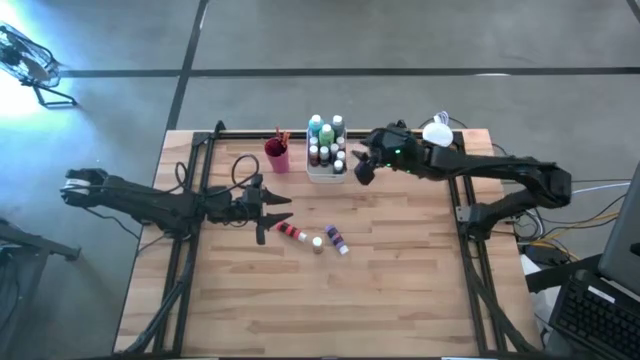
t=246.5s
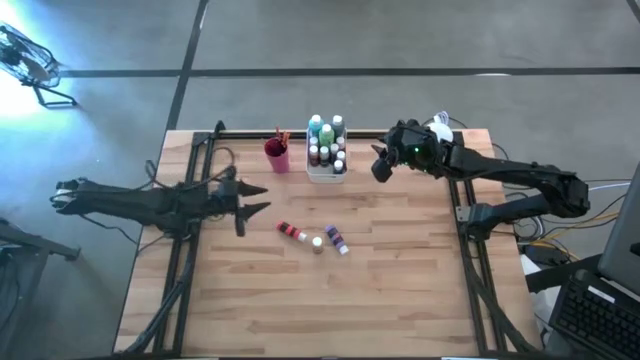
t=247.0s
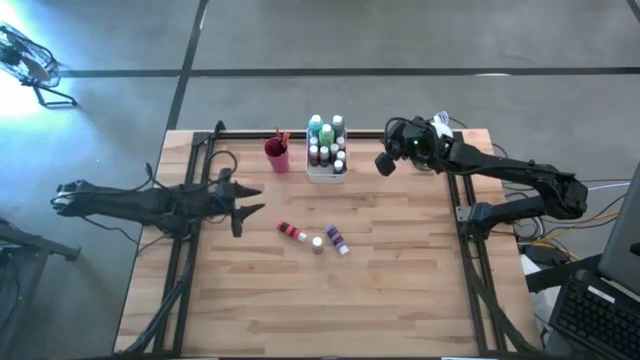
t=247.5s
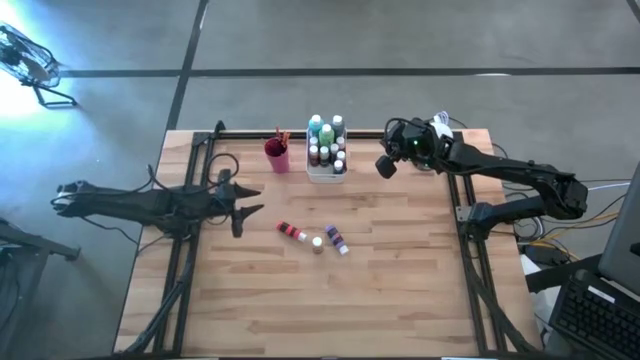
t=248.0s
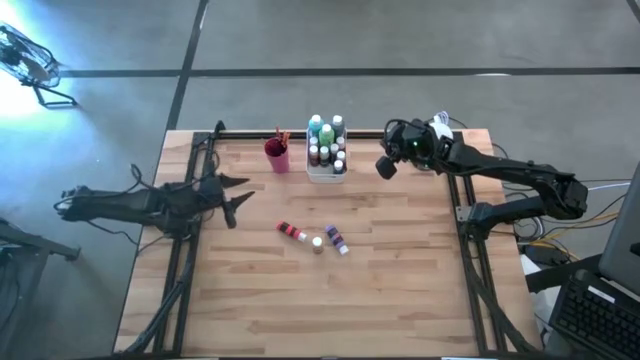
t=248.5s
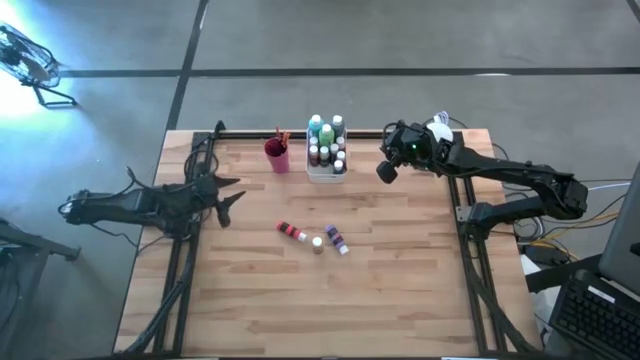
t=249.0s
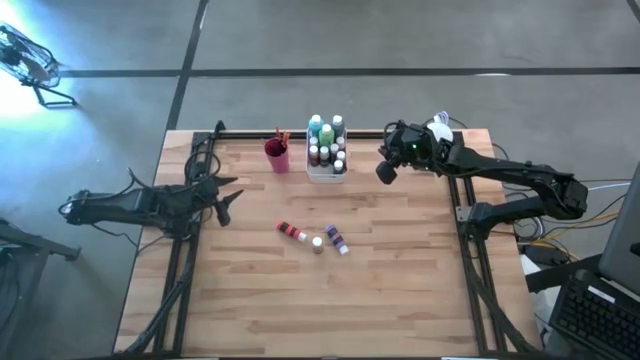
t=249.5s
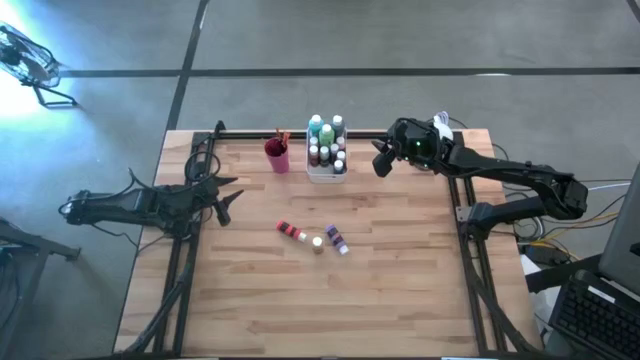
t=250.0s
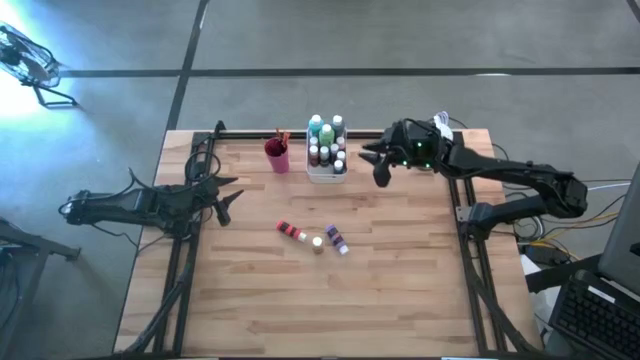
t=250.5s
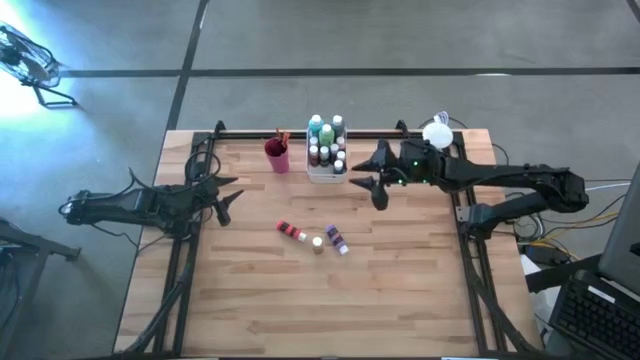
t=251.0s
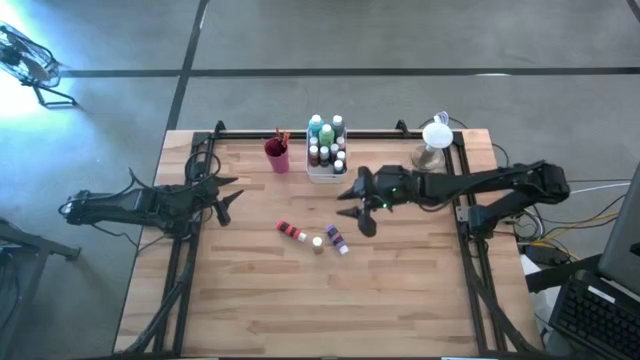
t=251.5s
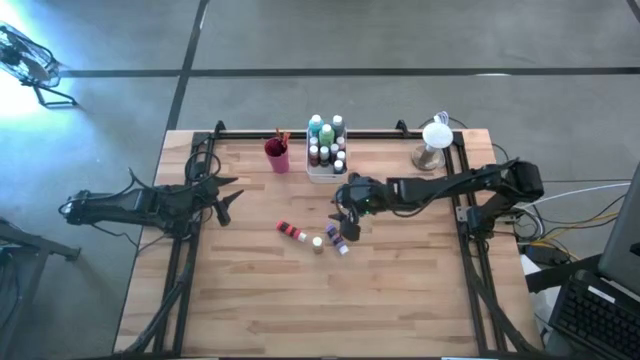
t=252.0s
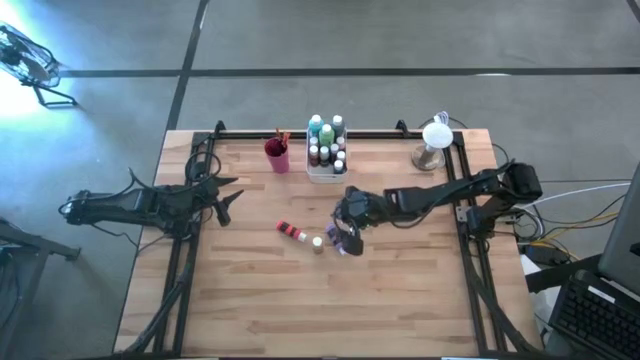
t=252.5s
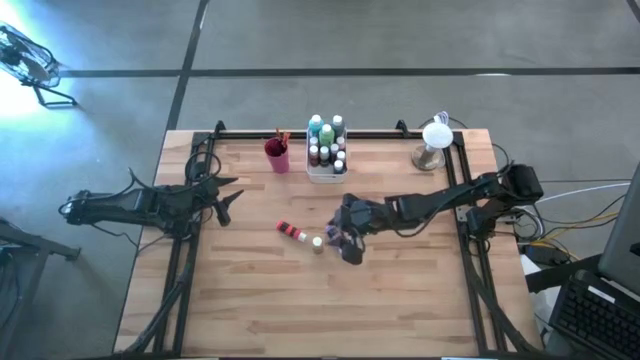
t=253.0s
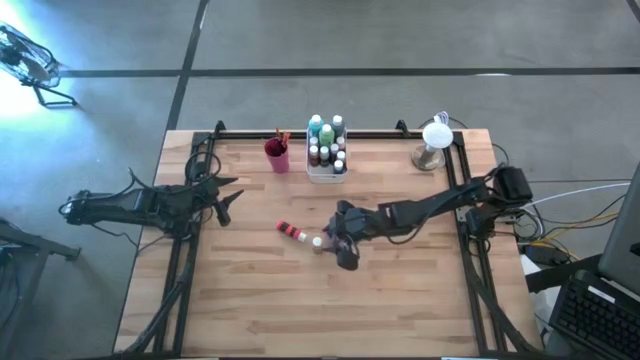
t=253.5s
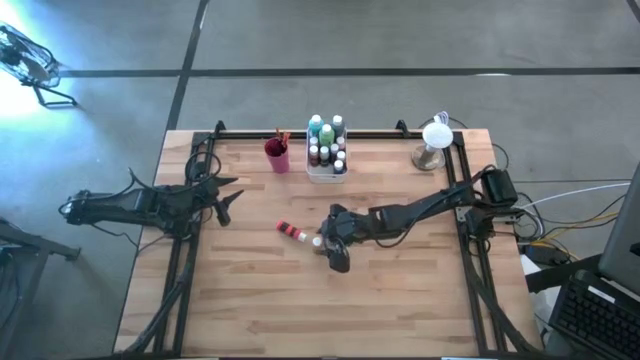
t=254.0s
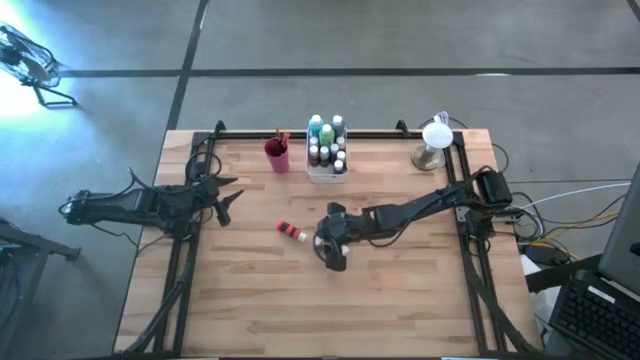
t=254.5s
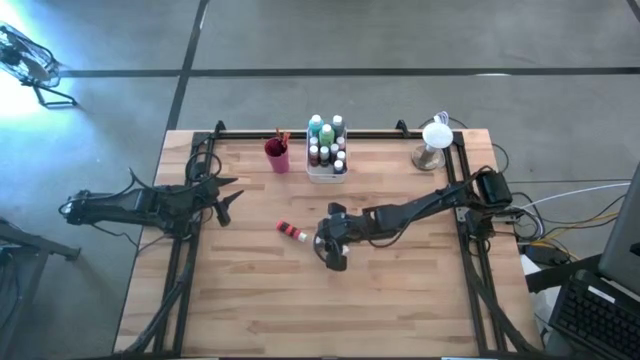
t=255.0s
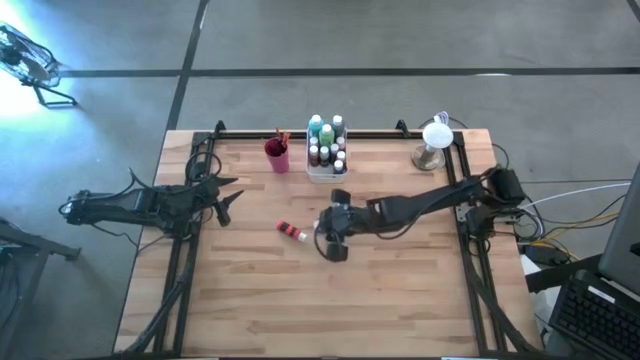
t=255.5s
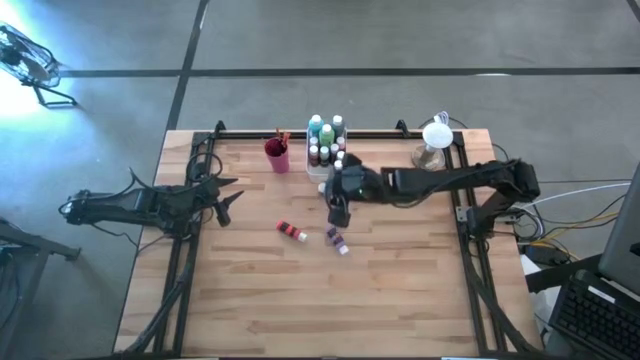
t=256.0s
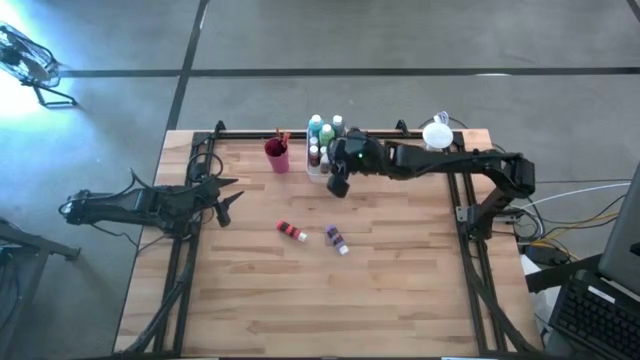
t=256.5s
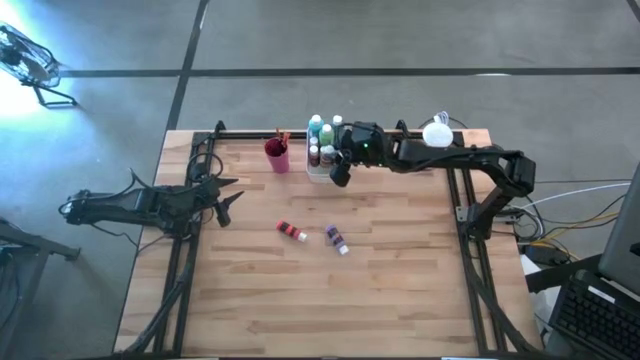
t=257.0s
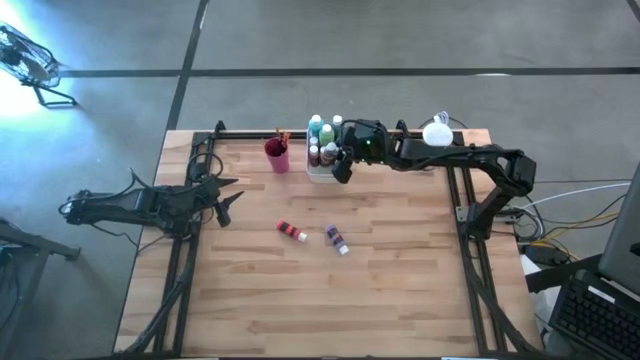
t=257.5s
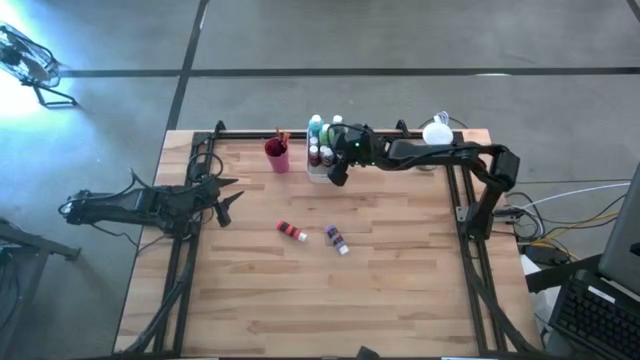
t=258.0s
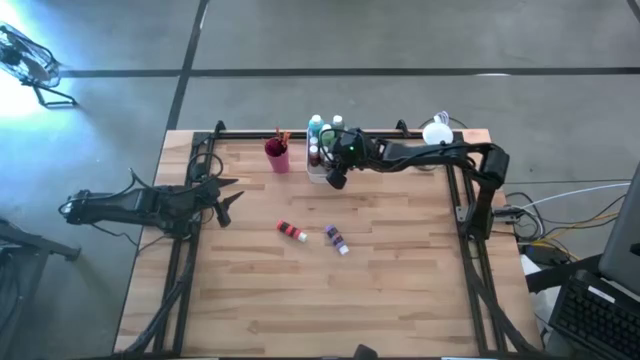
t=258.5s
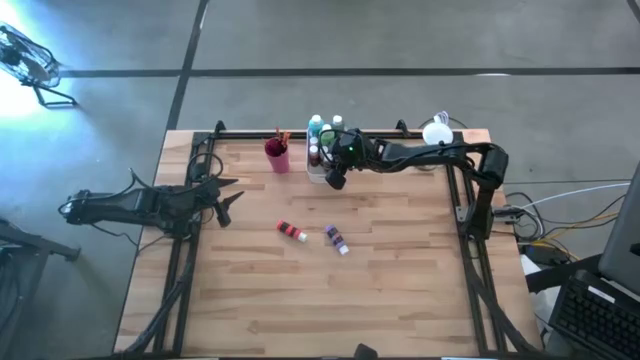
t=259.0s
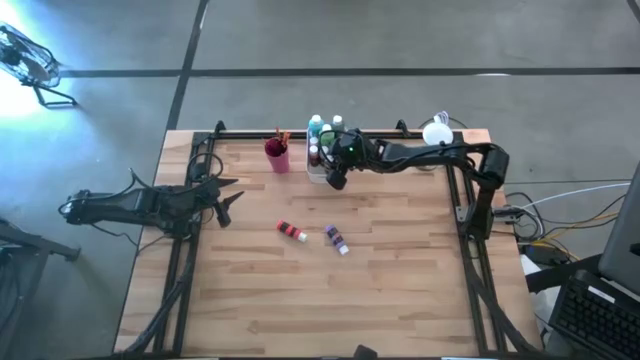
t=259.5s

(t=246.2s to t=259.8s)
Task: Pick & Place Paint Supplies
Put the yellow paint bottle into the white bin

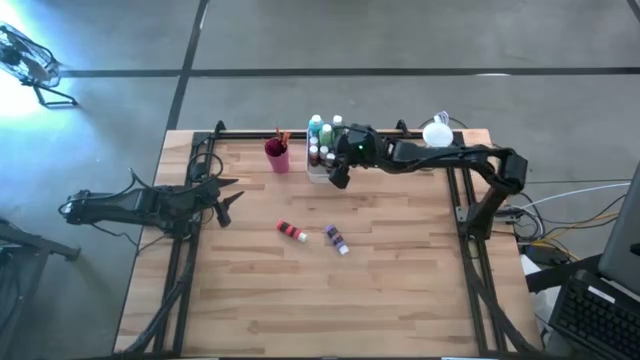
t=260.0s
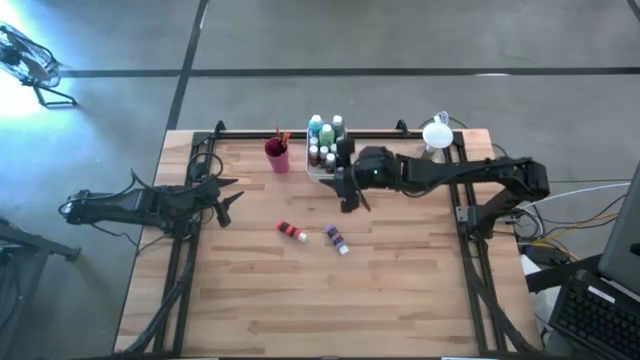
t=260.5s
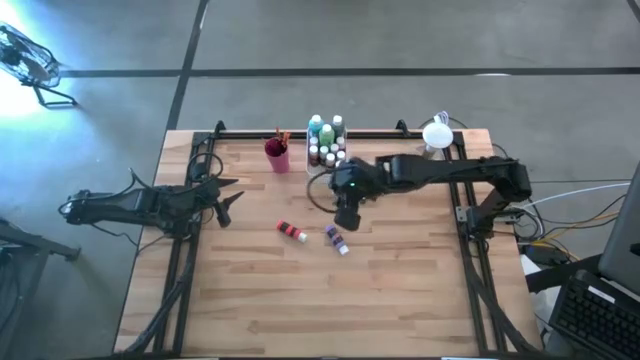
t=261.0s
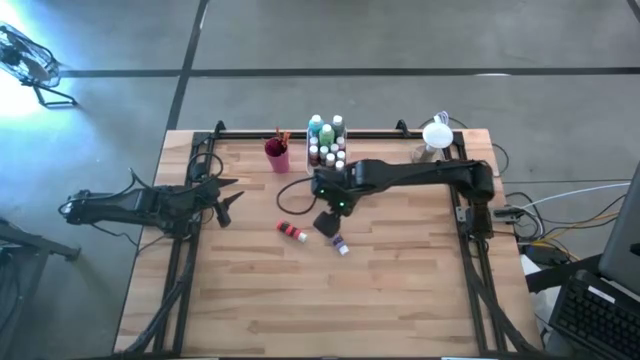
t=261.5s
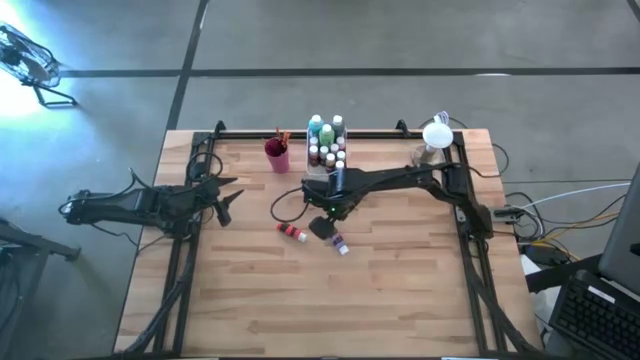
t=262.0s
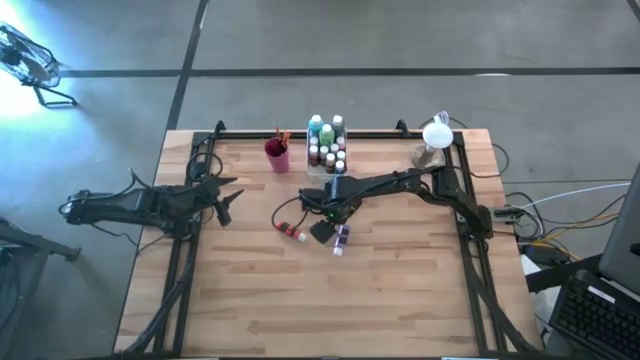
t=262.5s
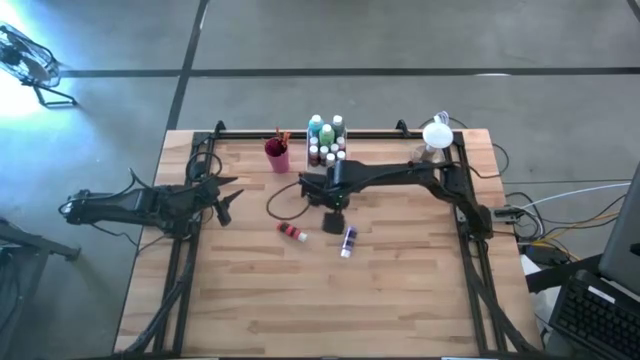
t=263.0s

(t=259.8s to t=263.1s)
Put the violet paint bottle into the white bin
